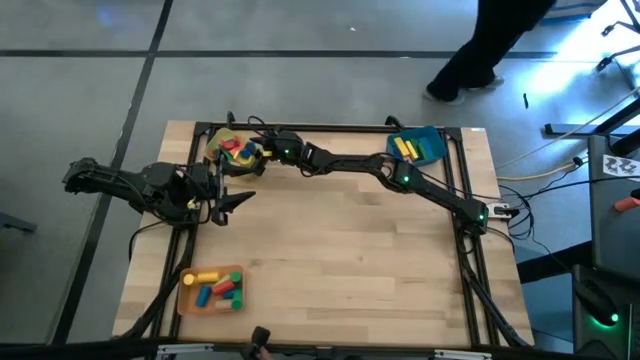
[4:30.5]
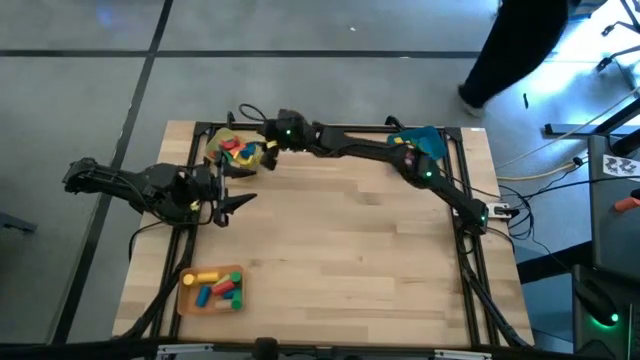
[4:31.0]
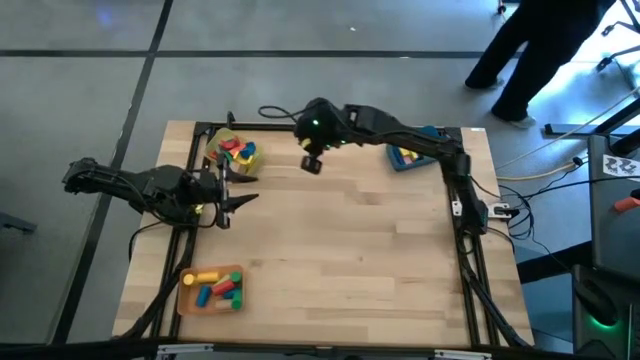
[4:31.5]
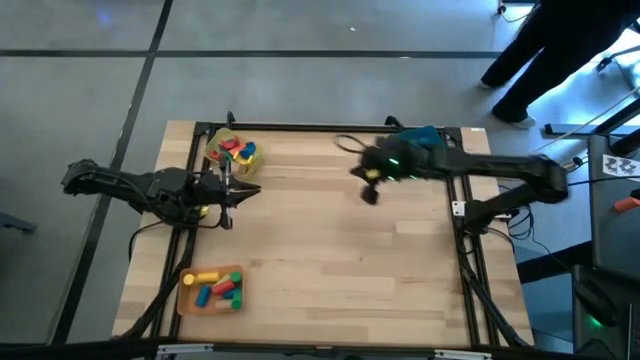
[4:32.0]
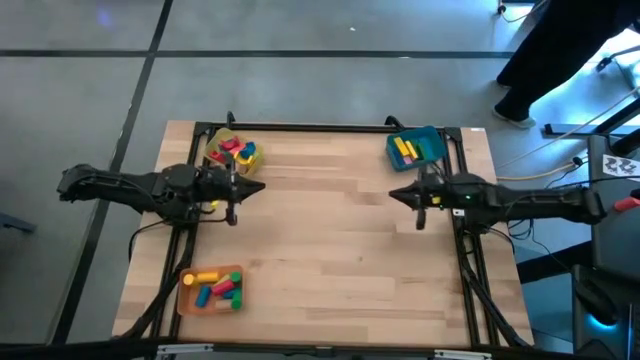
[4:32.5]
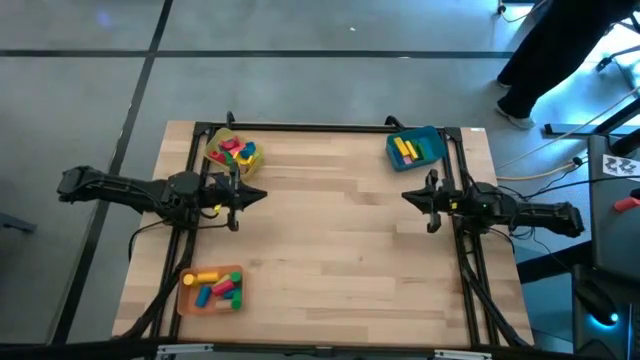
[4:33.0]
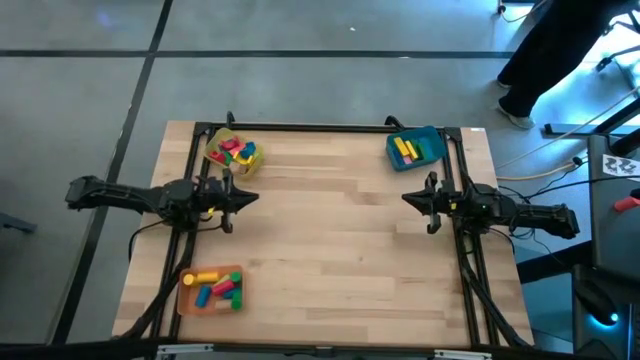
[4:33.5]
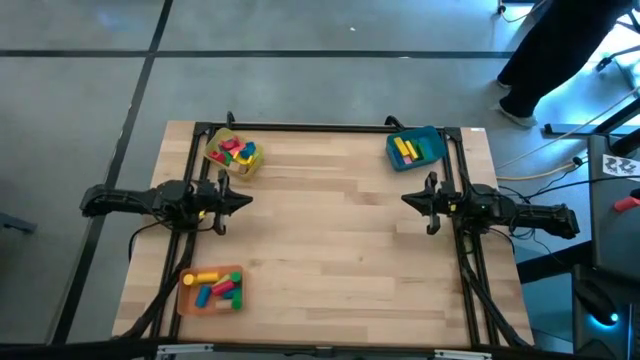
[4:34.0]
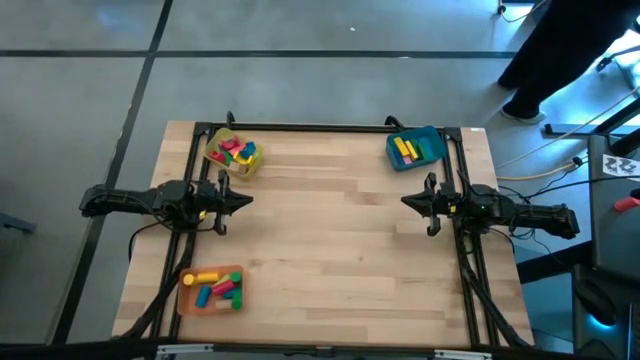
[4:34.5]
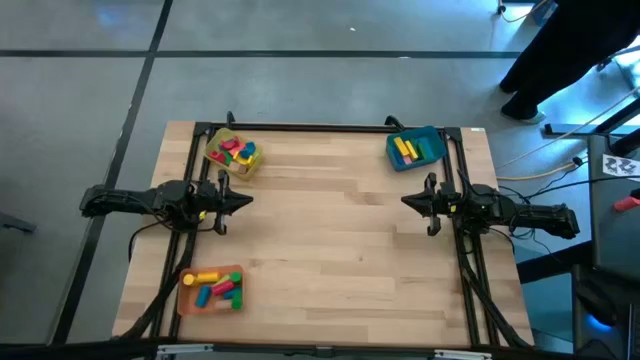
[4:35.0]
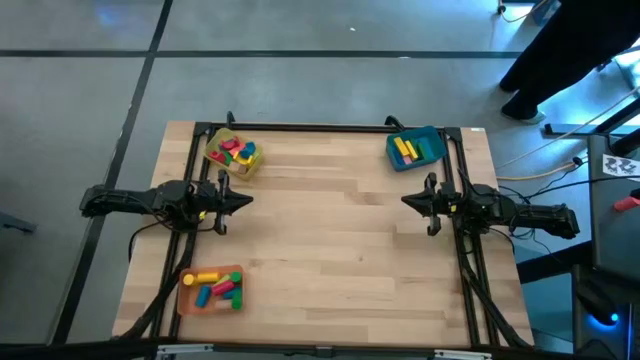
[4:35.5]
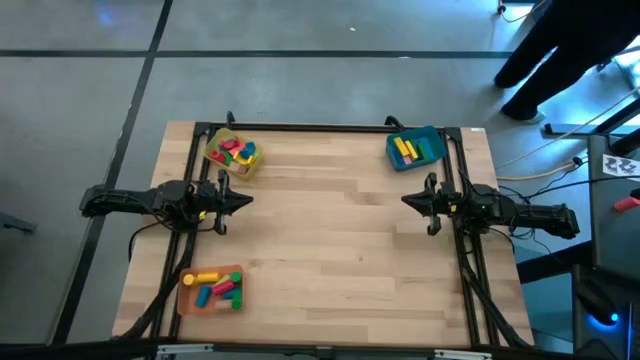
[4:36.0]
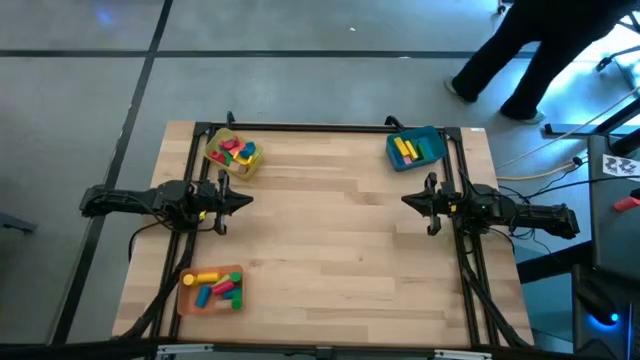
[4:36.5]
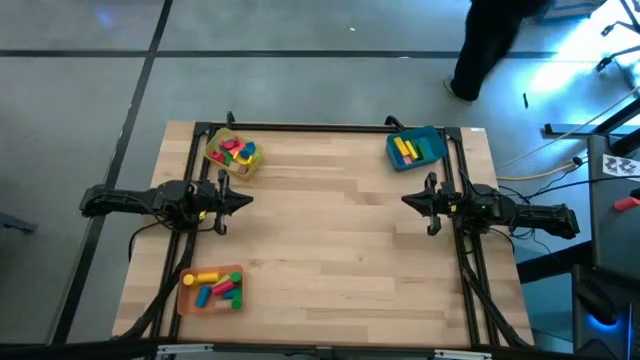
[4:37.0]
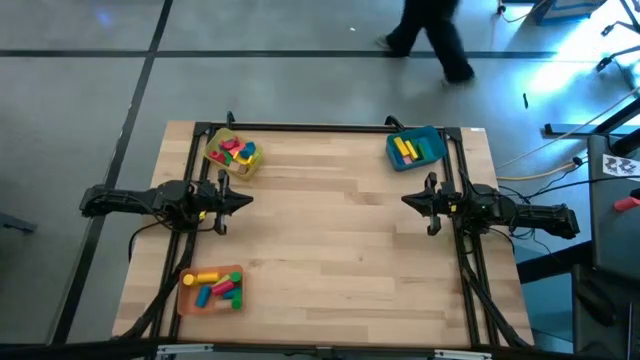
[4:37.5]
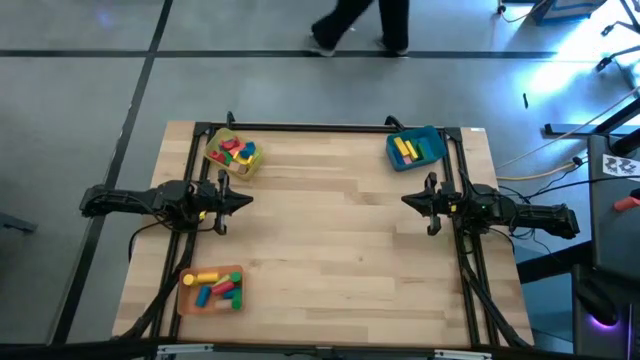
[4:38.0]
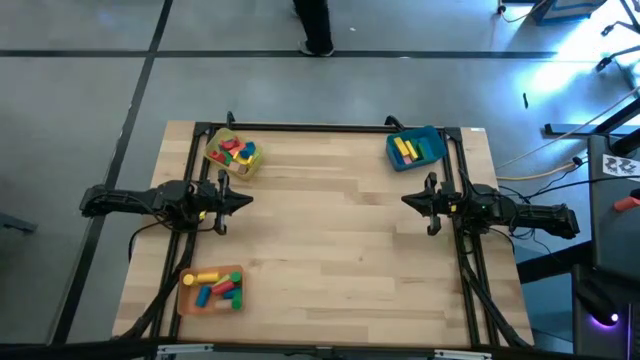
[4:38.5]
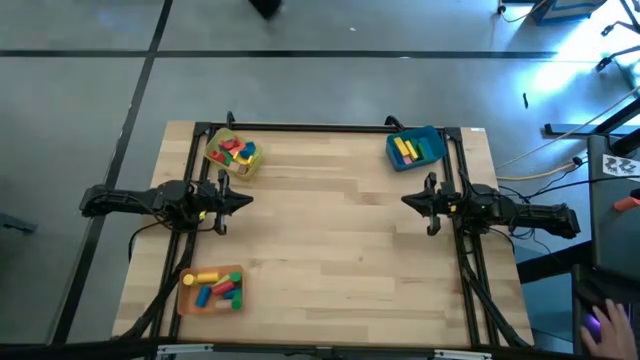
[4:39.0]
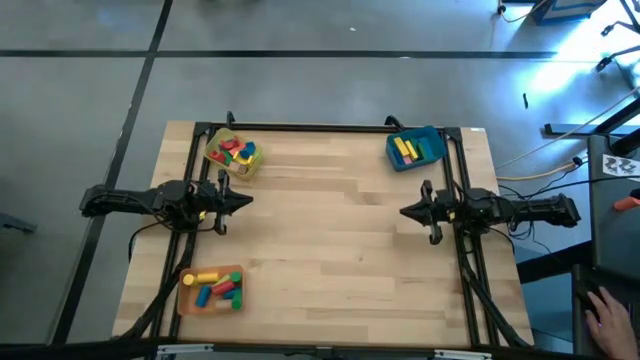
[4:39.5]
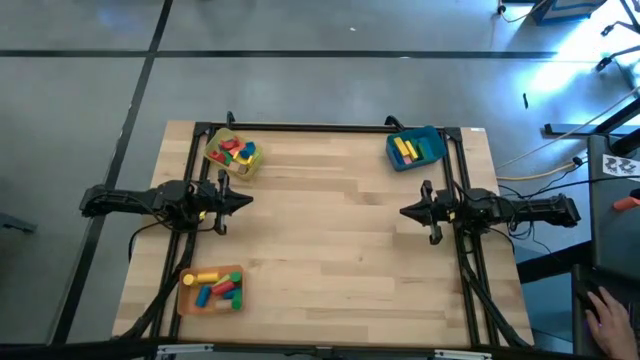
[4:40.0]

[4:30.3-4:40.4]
Task: Sort blocks by size
Return to Home Position

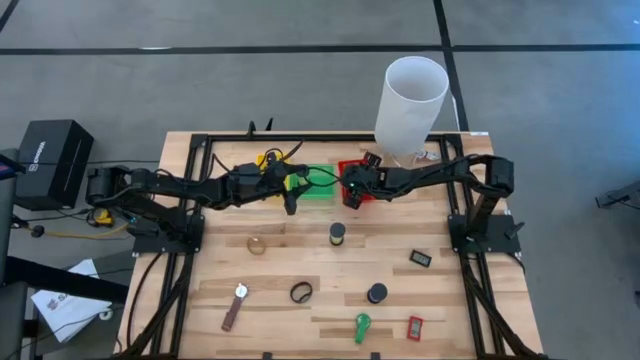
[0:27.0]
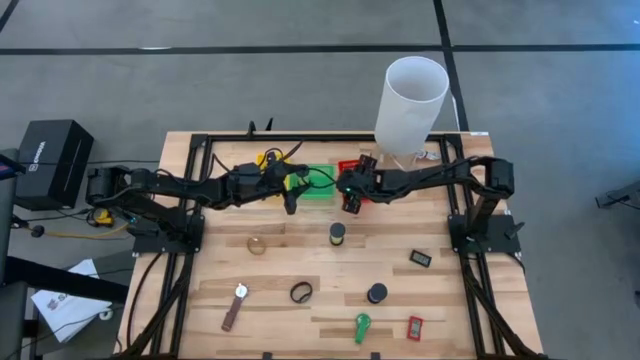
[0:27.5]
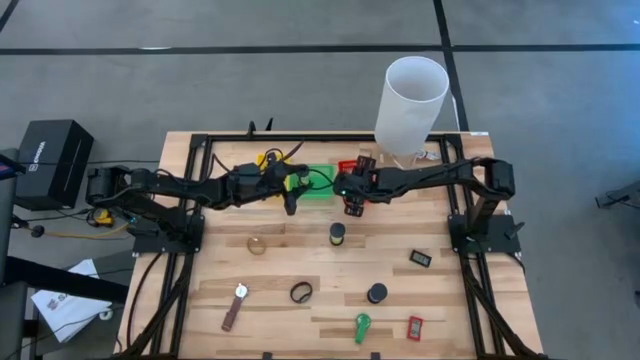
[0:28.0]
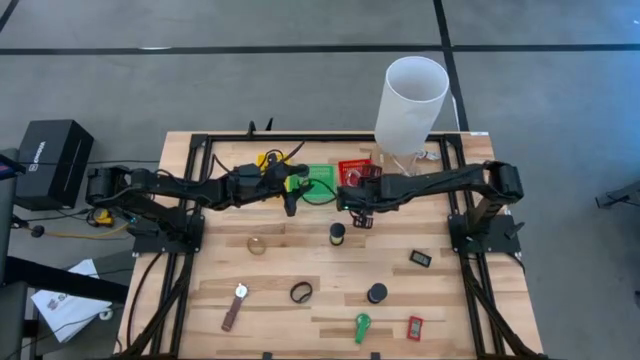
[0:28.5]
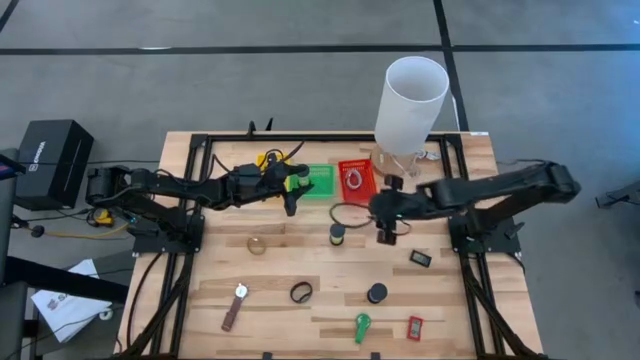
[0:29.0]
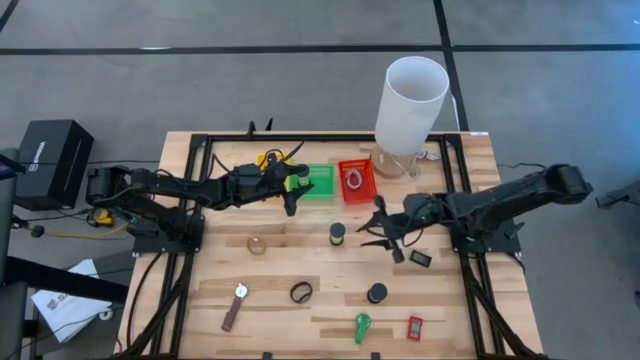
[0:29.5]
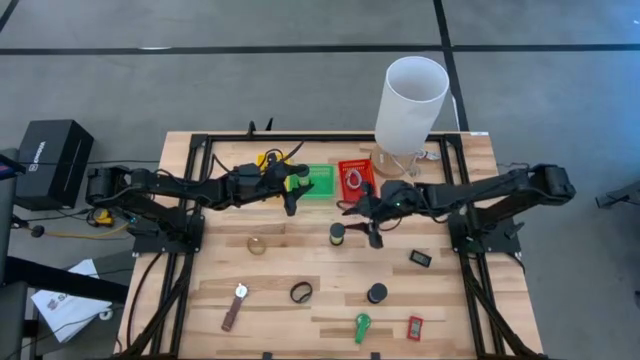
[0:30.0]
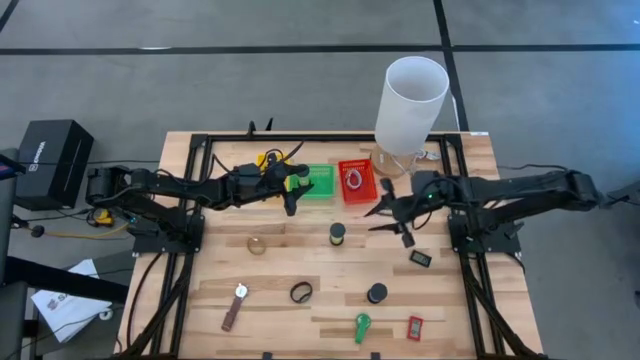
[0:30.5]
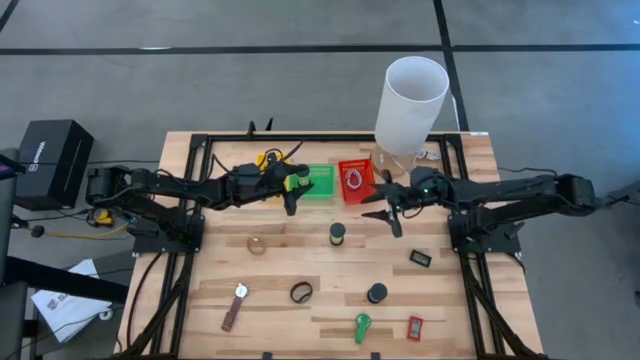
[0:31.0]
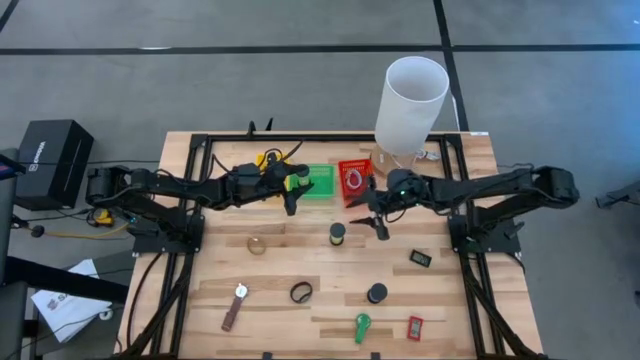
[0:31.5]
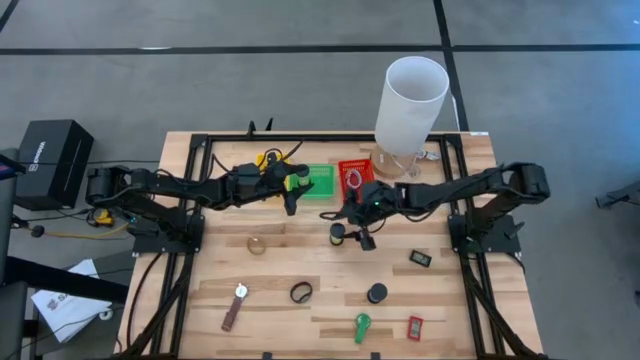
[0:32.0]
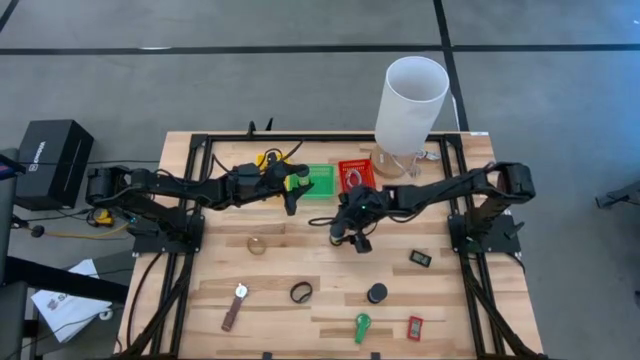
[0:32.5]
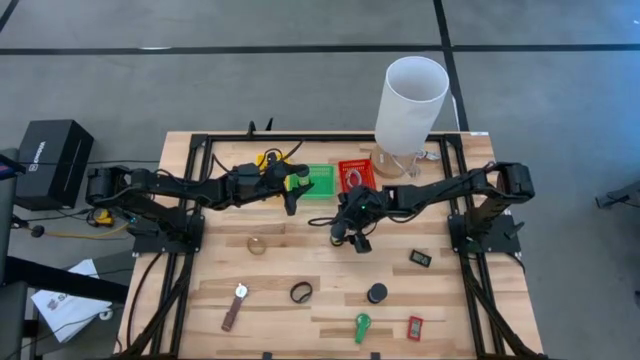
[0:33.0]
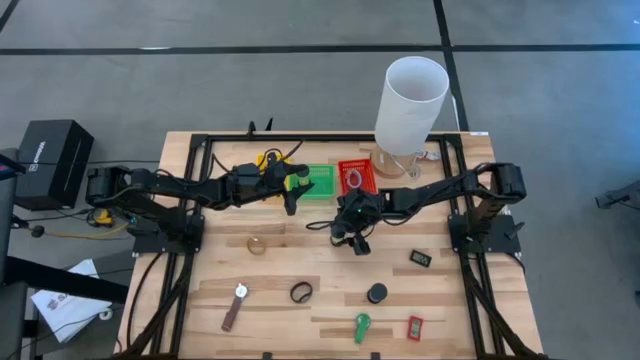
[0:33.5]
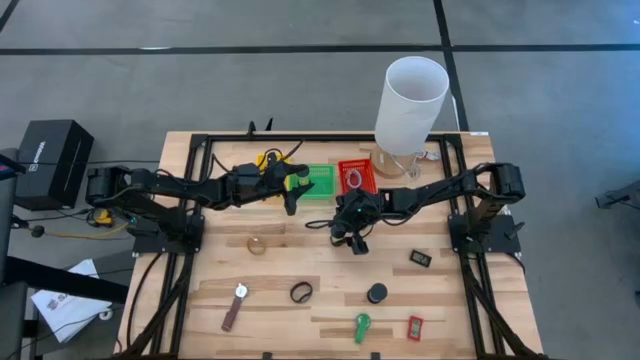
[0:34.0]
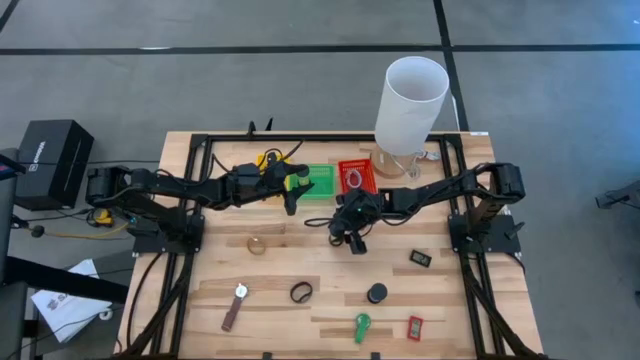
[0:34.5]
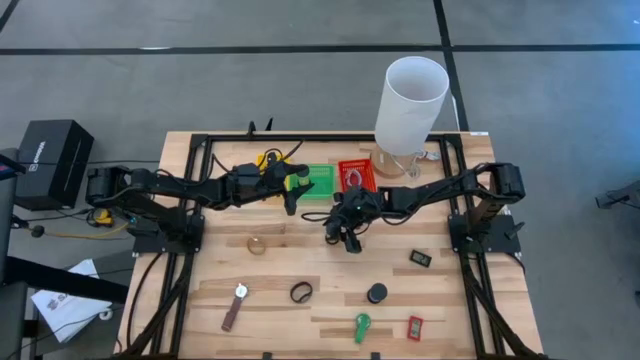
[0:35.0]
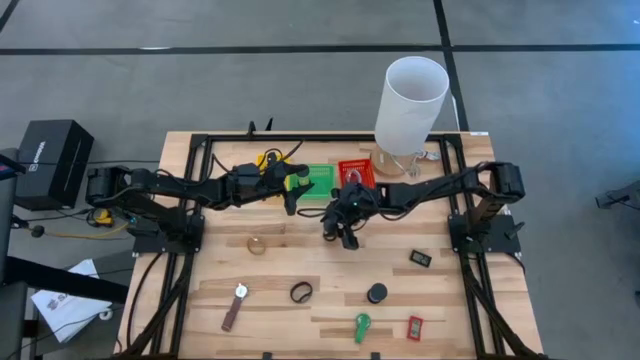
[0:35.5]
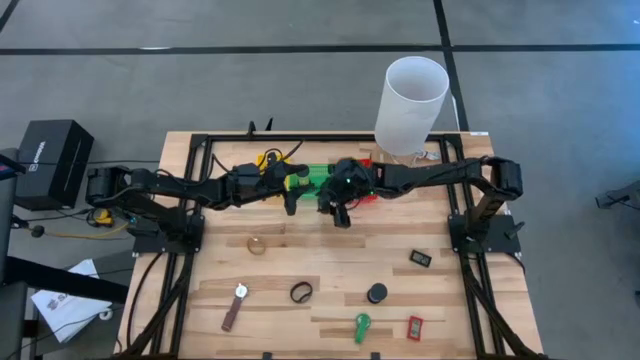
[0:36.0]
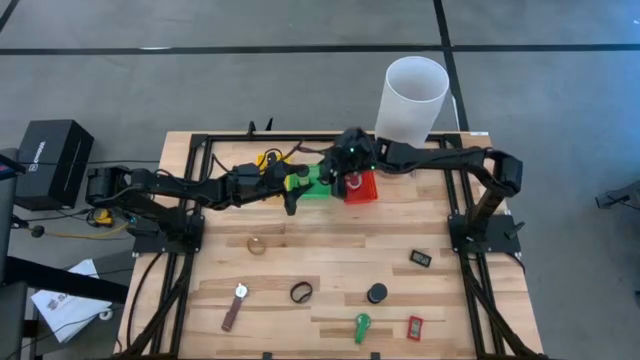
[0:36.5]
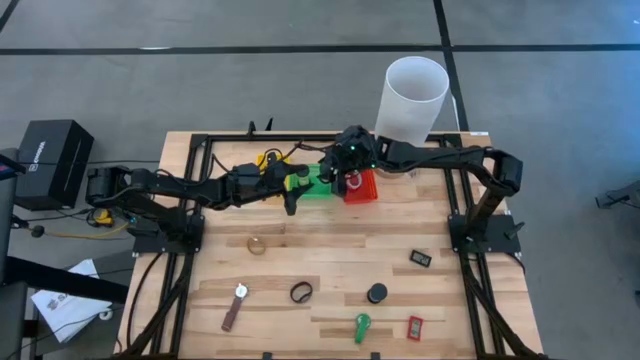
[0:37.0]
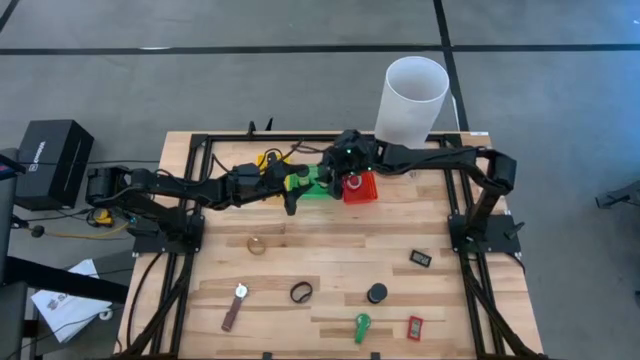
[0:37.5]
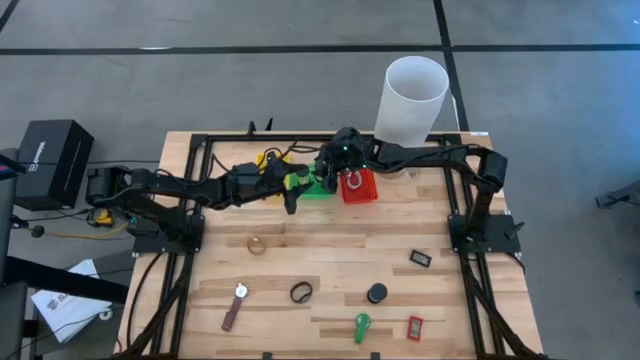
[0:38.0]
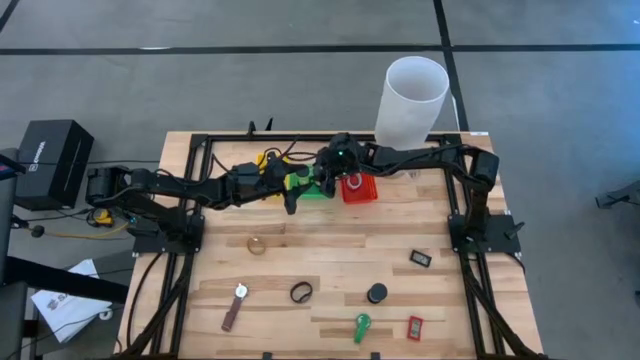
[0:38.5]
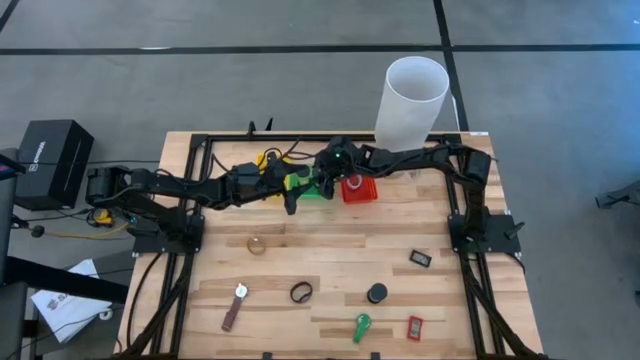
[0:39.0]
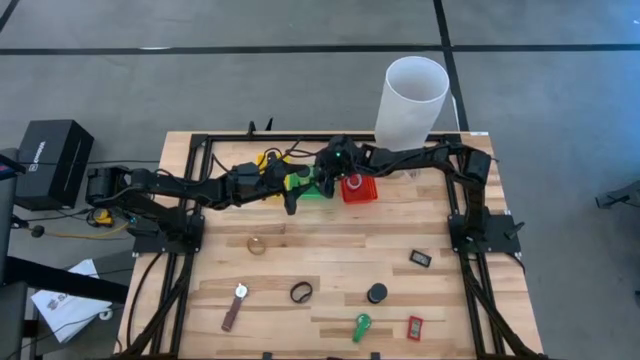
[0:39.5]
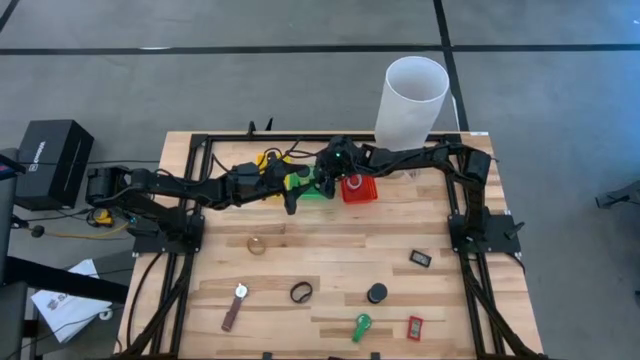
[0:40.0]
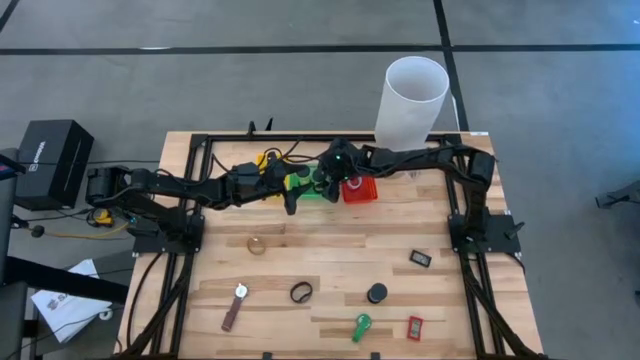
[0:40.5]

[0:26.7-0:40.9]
Task: Pick & Place Office items
Put the green hourglass into the green basket
